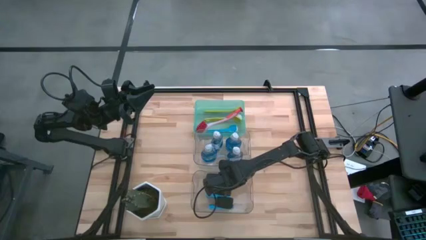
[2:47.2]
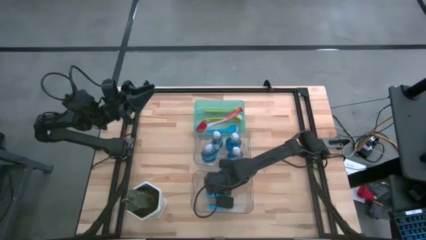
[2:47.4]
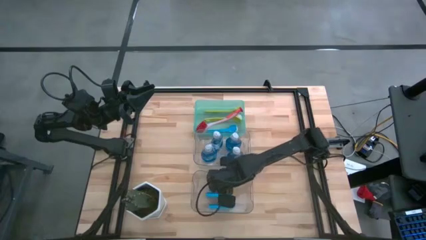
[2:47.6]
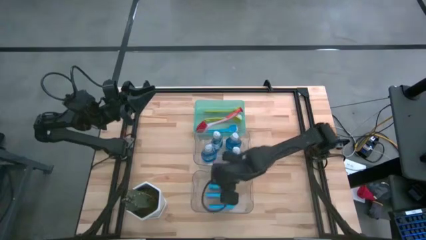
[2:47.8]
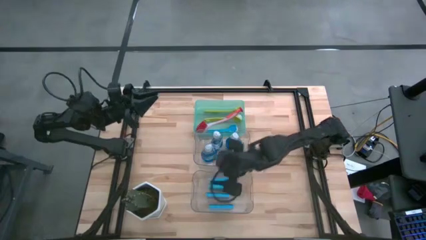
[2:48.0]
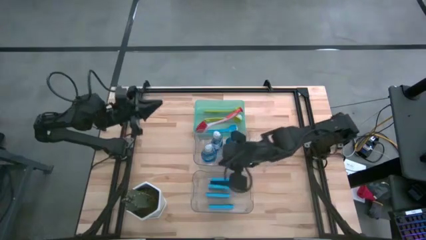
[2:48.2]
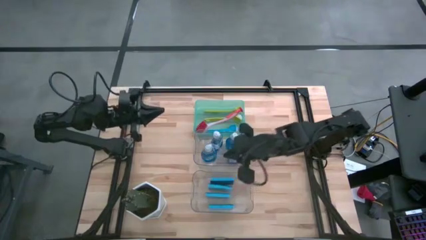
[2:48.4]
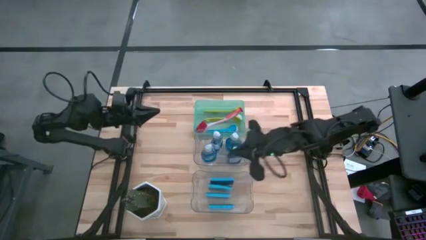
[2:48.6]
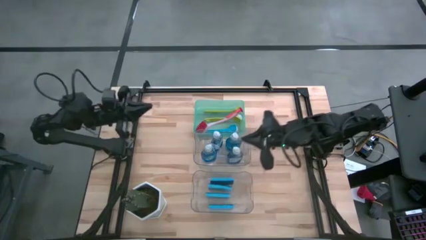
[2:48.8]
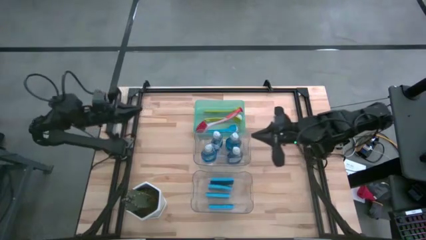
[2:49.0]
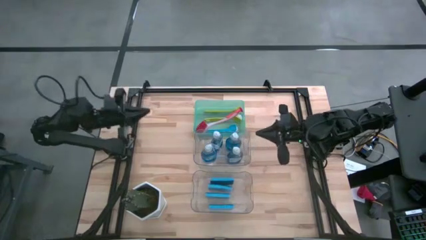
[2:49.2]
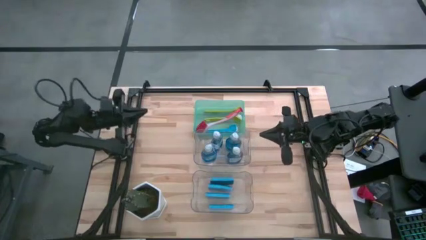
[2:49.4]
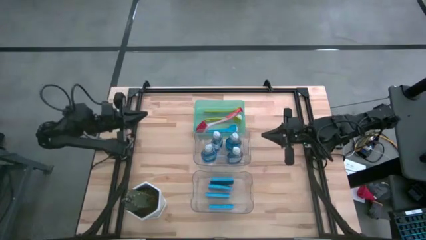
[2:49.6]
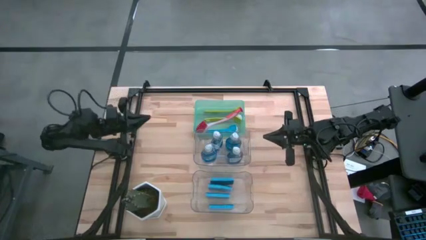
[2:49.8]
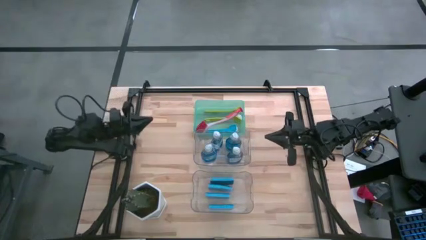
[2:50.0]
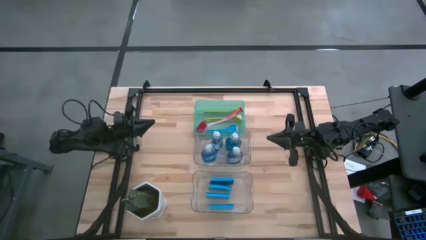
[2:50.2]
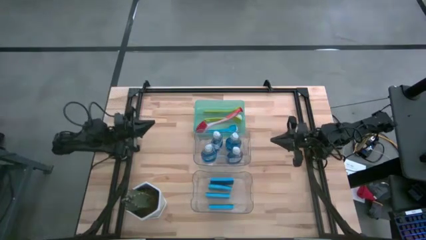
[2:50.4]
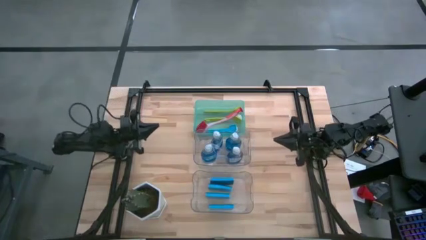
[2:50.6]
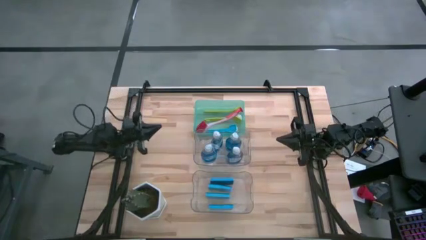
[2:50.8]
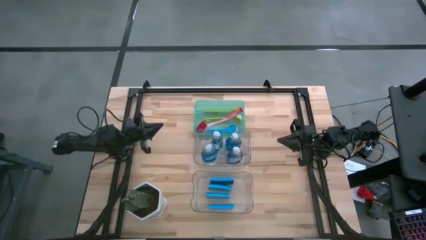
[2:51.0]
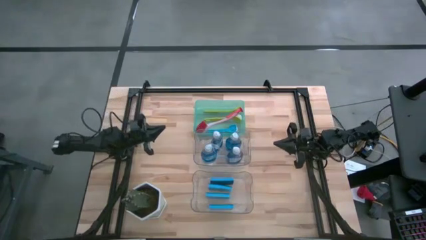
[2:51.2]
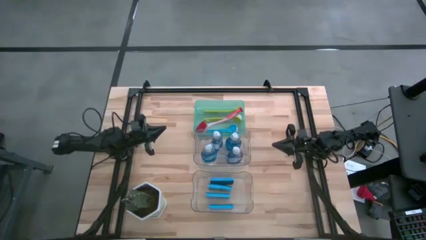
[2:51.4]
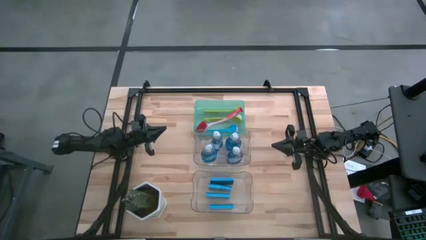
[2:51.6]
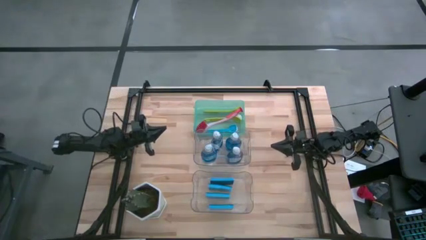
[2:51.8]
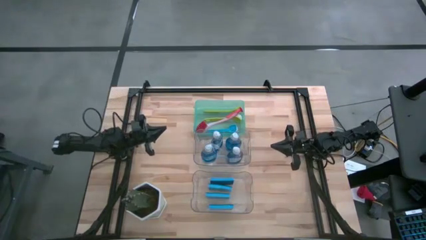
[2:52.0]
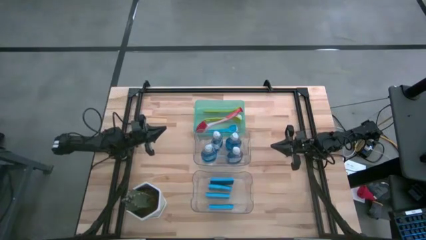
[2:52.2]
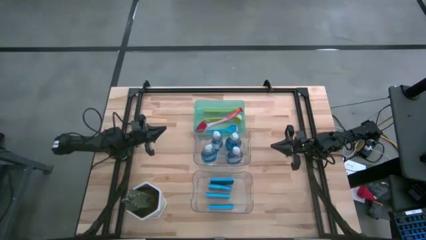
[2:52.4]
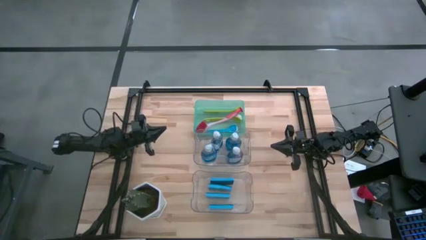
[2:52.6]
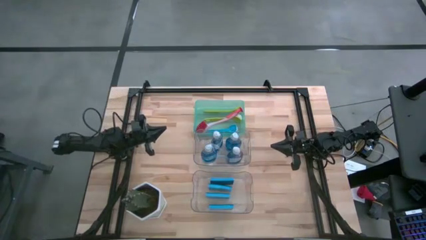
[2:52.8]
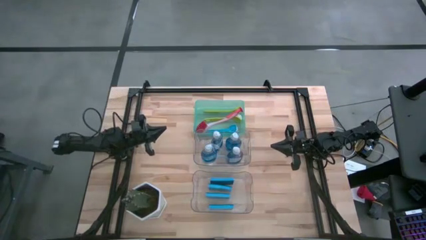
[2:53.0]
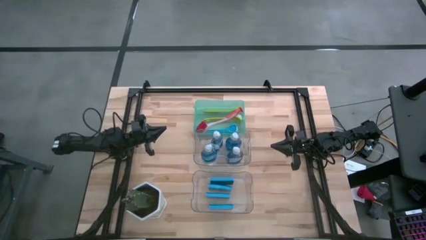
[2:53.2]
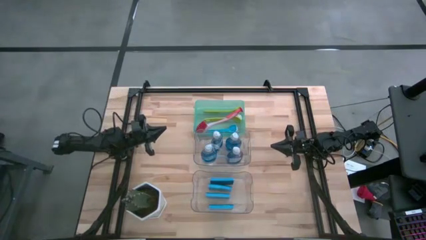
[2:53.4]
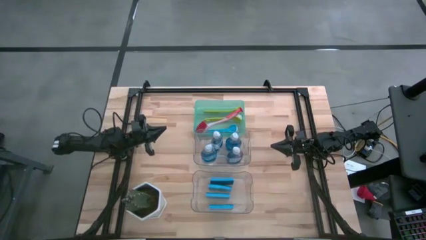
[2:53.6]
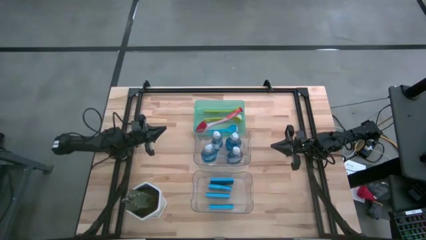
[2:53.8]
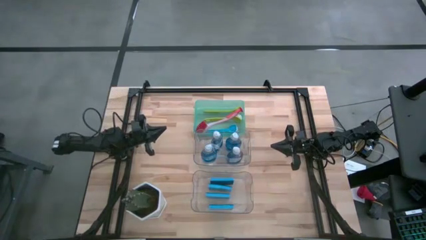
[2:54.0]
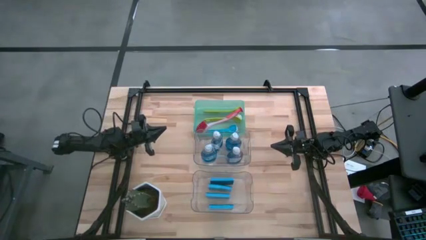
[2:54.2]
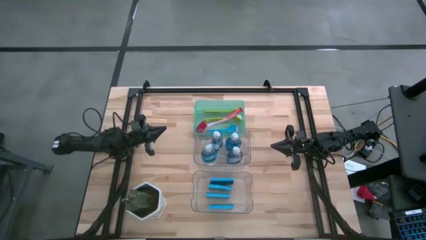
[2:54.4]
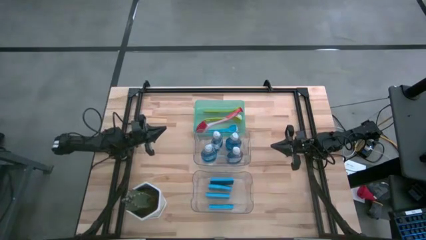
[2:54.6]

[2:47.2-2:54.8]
Task: Pick & Place Kitchen Sink Supplies
Return to Home Position

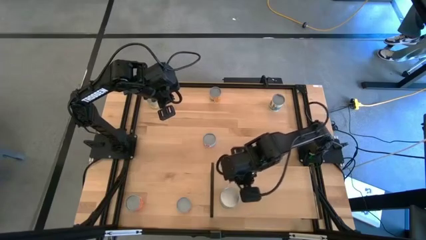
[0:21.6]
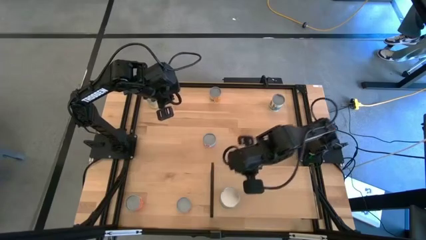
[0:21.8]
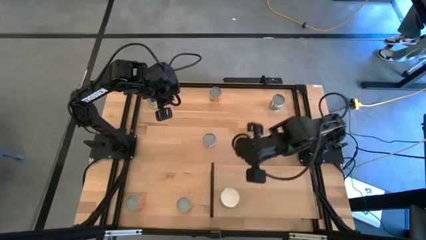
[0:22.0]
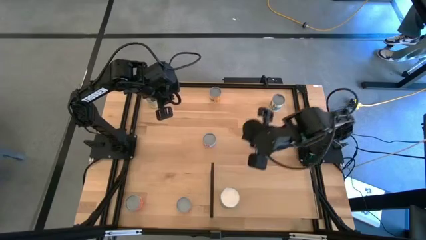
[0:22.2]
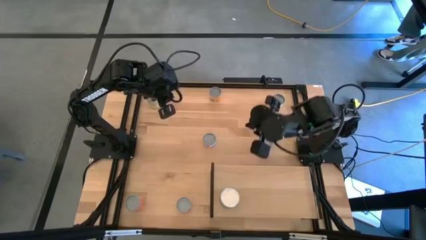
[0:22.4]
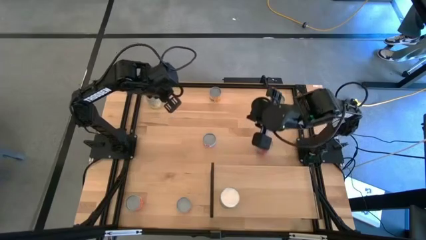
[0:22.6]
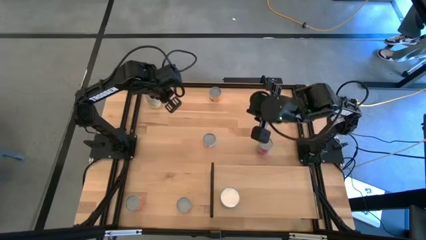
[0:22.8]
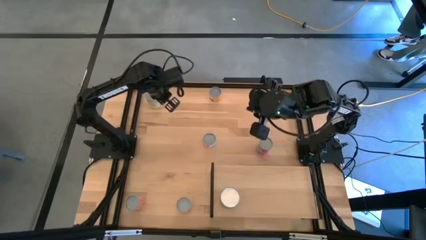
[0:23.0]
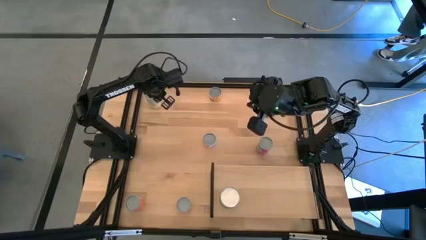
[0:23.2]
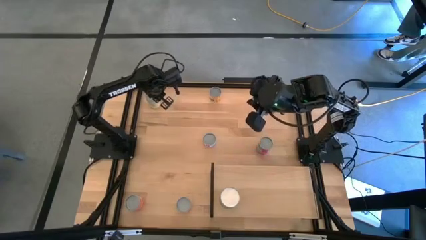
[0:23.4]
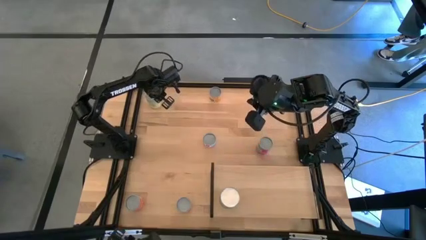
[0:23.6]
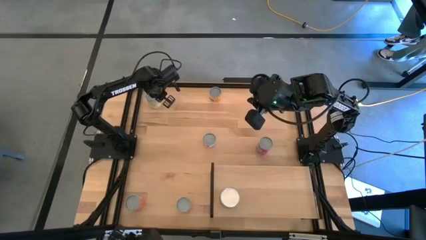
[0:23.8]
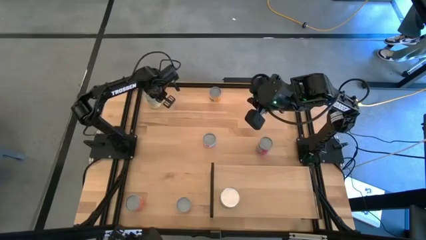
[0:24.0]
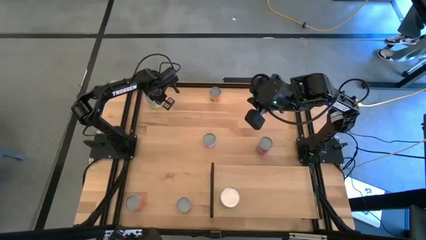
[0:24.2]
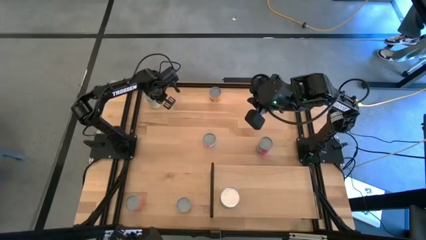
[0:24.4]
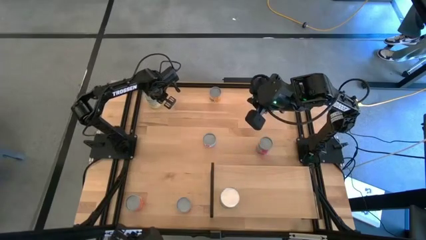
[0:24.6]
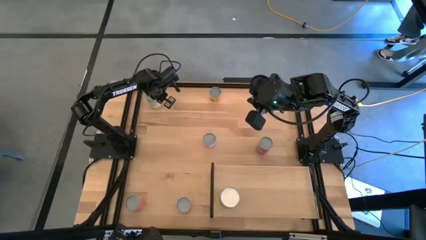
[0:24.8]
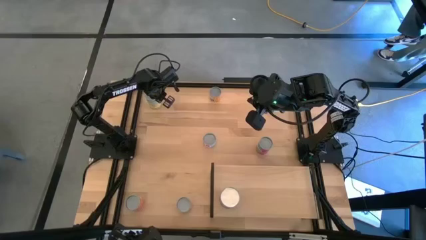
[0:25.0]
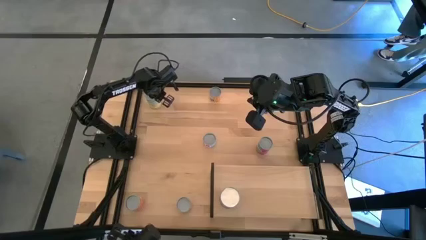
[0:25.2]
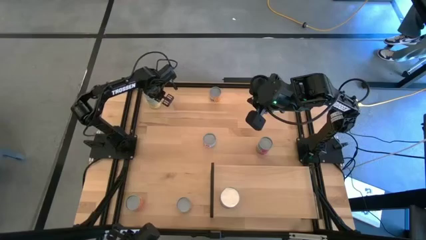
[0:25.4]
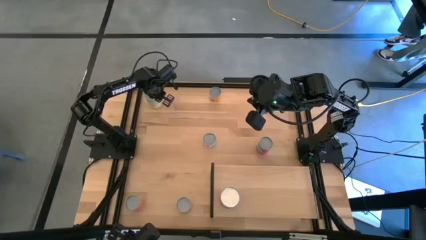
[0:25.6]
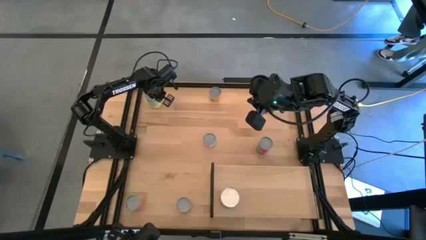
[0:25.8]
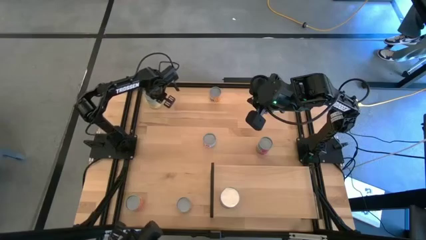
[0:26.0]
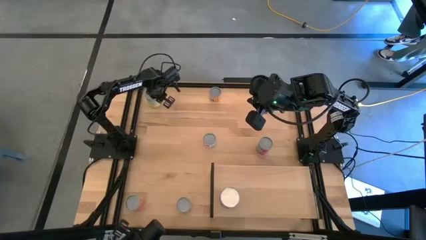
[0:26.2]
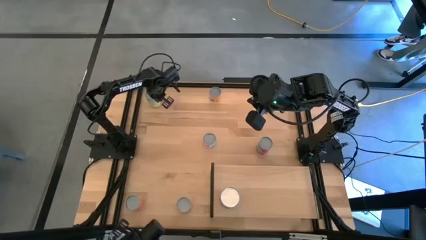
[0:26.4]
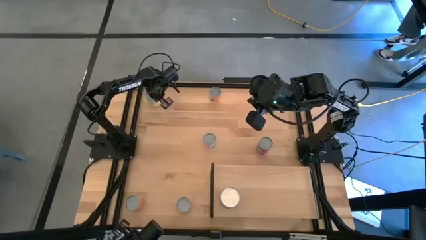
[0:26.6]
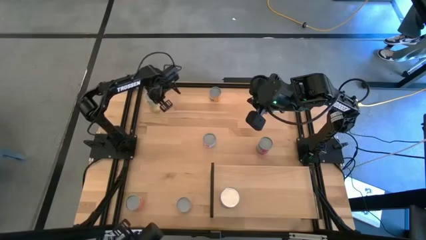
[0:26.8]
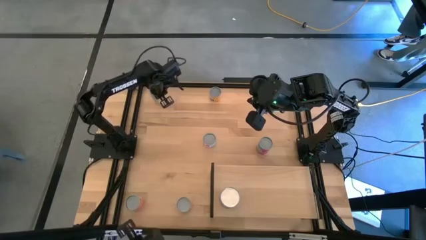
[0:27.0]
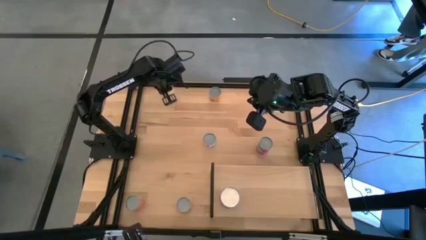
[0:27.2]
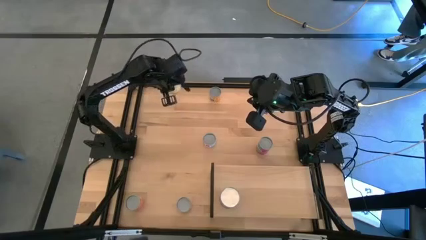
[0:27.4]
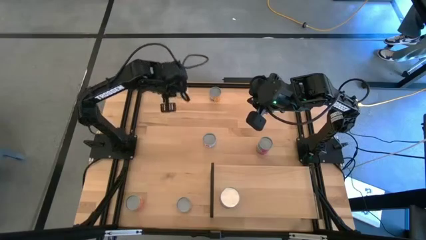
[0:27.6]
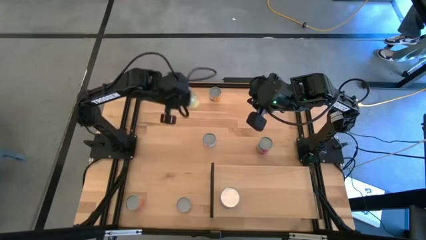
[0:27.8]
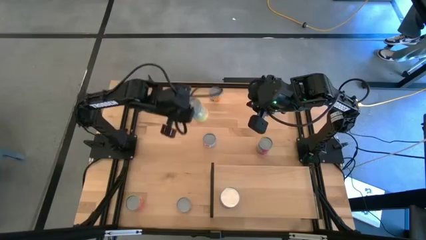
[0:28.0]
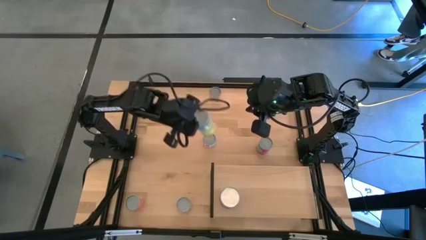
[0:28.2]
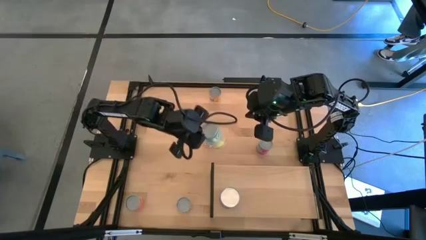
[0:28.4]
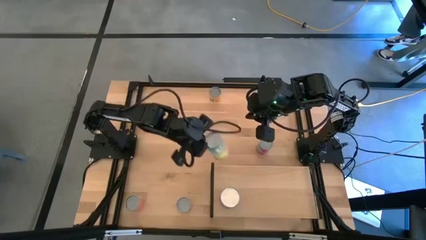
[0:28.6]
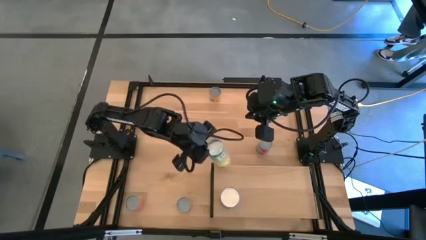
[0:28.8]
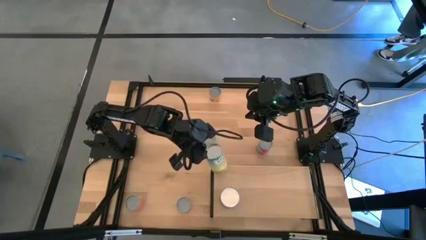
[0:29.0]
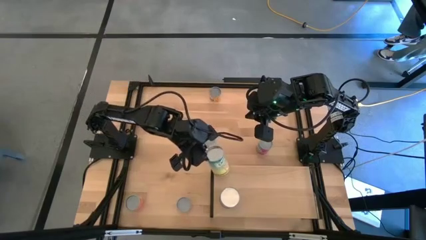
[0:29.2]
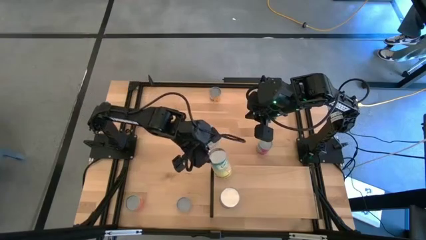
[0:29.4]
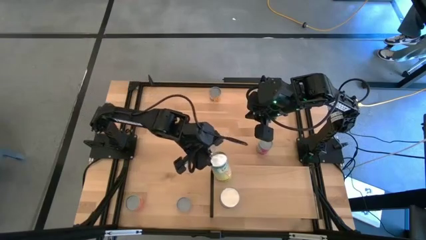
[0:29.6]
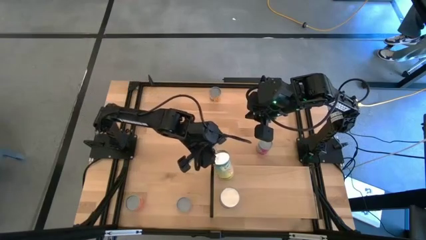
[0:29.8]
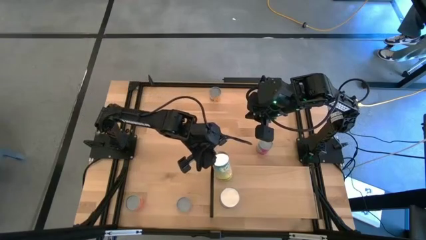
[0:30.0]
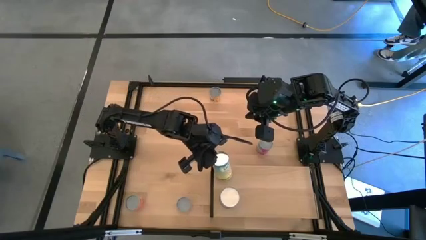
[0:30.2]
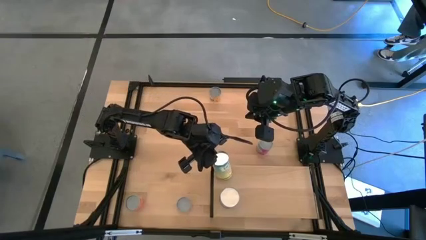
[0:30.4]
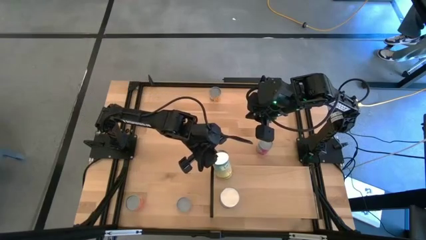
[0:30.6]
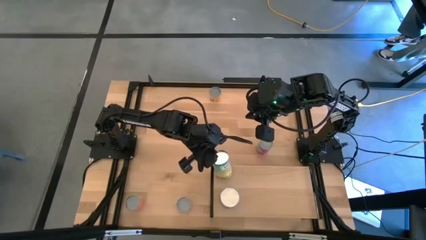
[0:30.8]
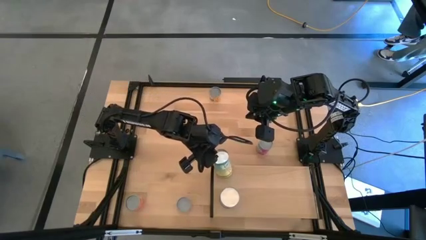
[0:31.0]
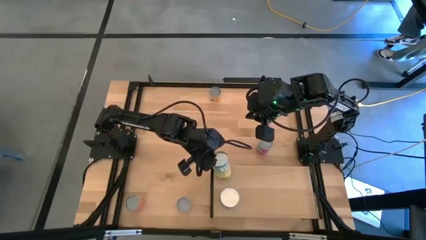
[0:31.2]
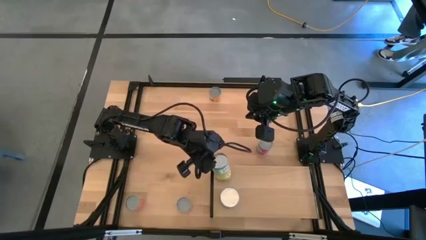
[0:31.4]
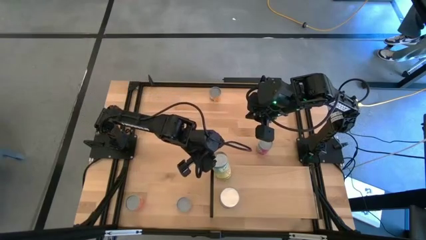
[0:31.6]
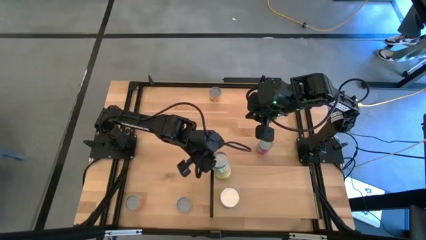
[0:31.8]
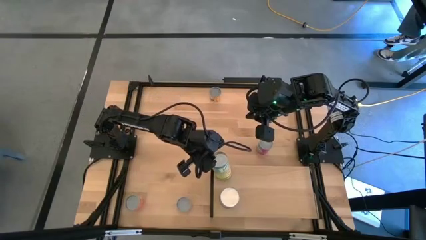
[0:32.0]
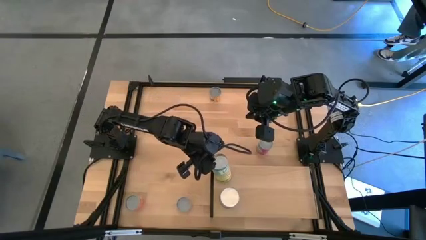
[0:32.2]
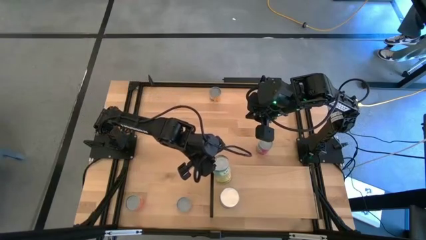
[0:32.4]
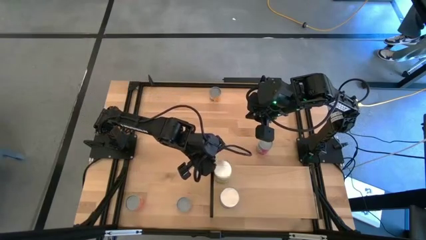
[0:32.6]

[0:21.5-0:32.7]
Task: Pick and place cans onto a shelf
Put the canned carrots on the shelf
